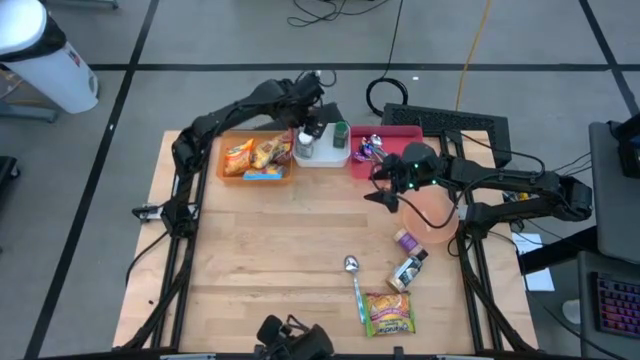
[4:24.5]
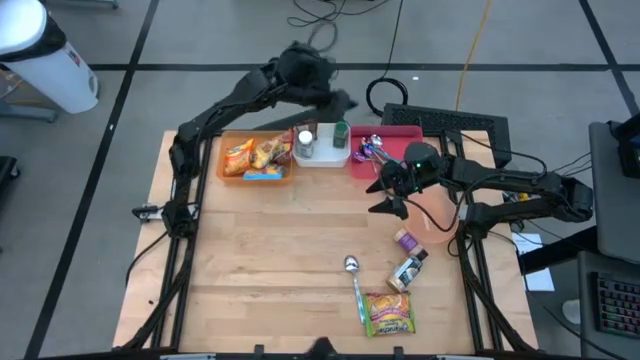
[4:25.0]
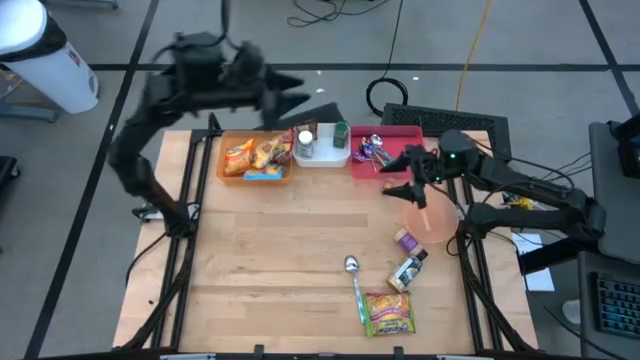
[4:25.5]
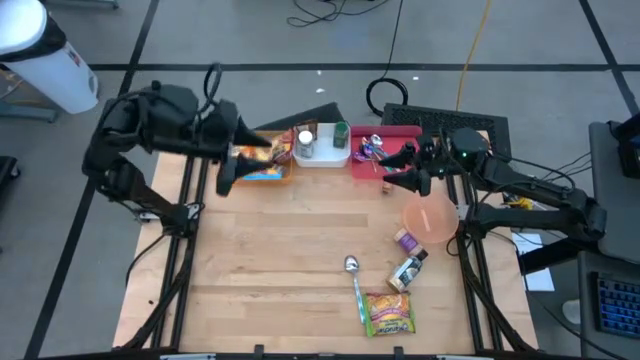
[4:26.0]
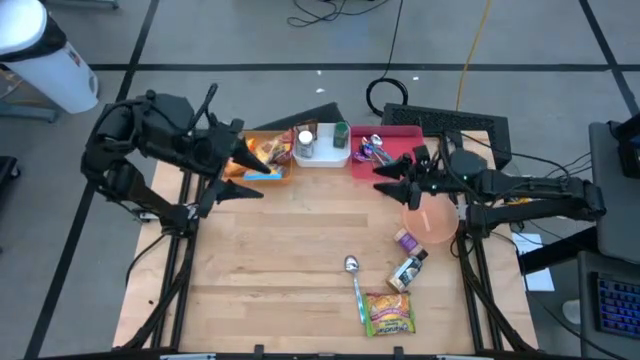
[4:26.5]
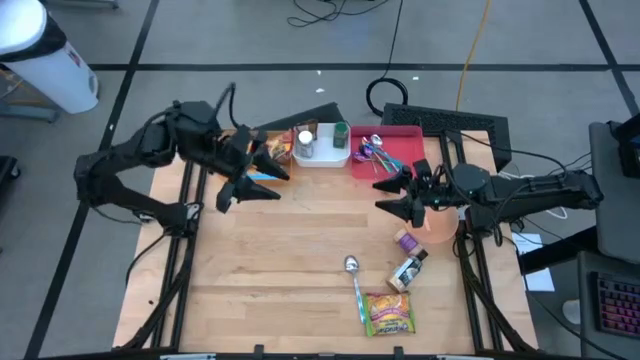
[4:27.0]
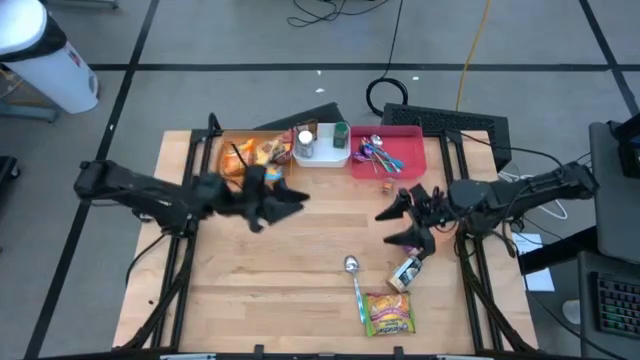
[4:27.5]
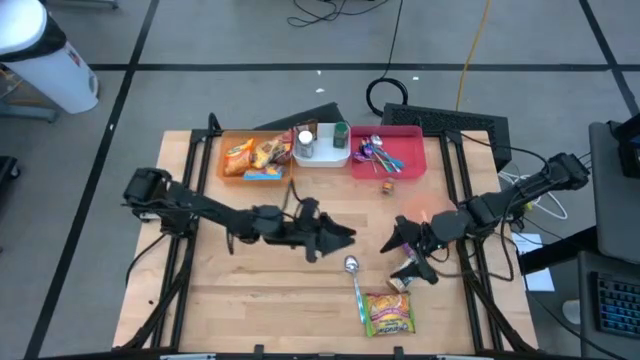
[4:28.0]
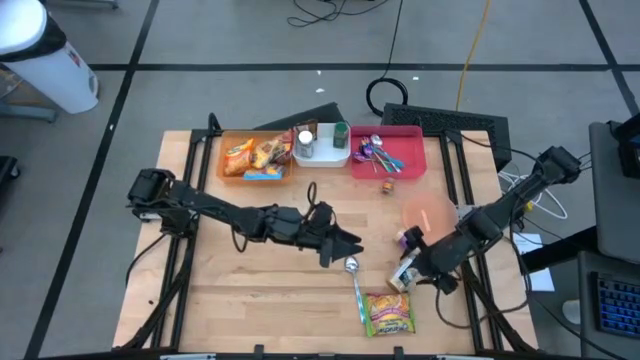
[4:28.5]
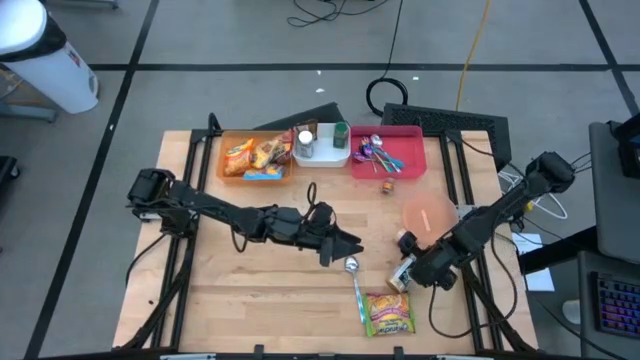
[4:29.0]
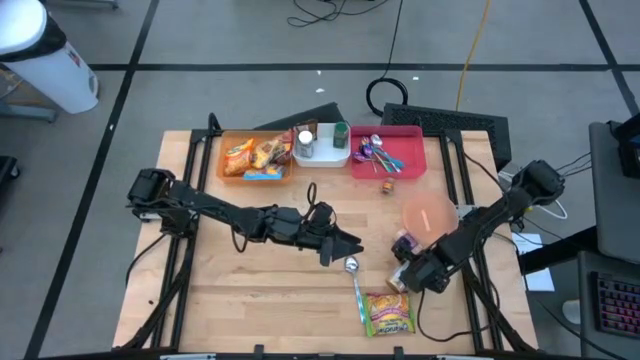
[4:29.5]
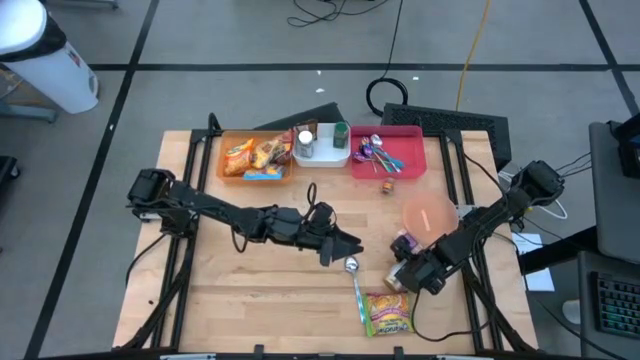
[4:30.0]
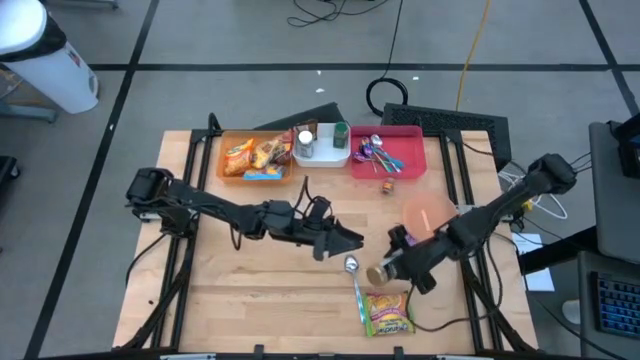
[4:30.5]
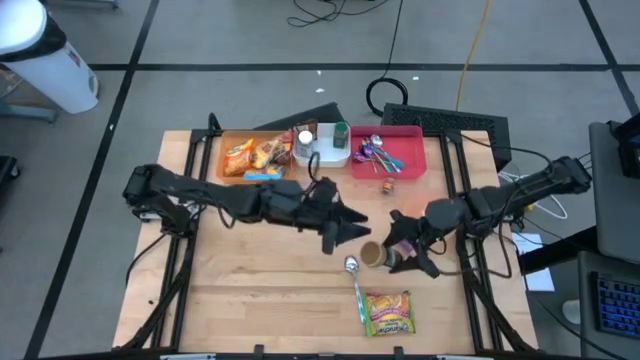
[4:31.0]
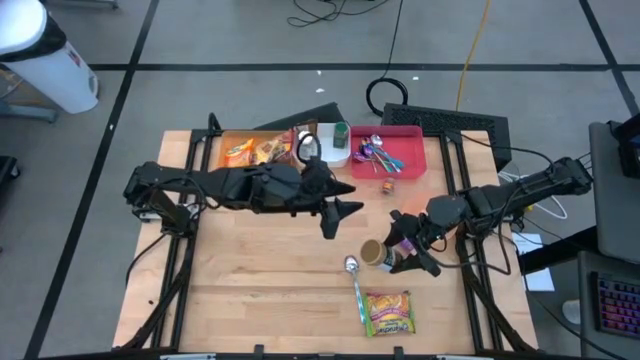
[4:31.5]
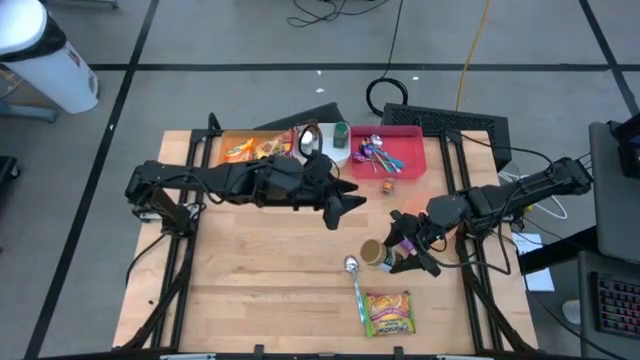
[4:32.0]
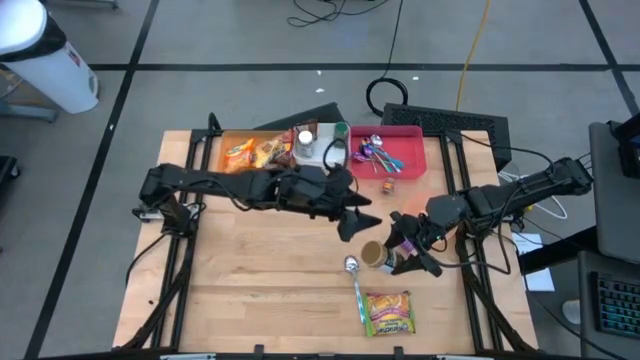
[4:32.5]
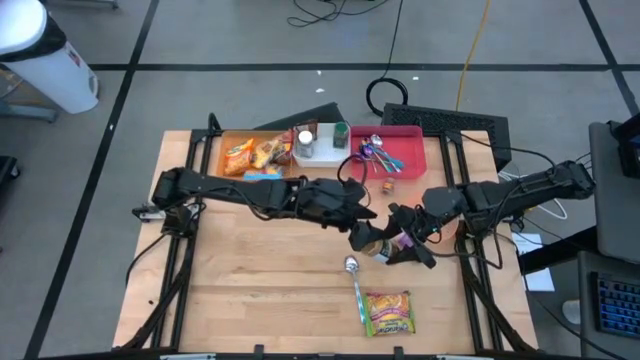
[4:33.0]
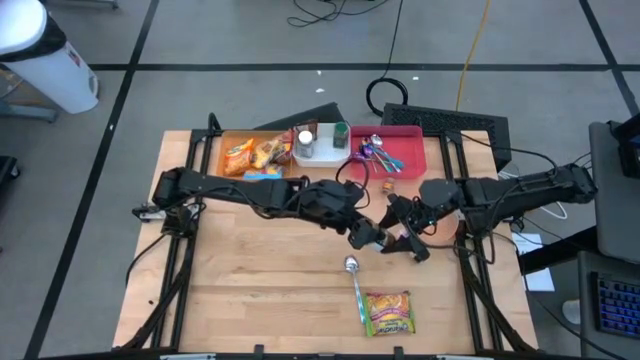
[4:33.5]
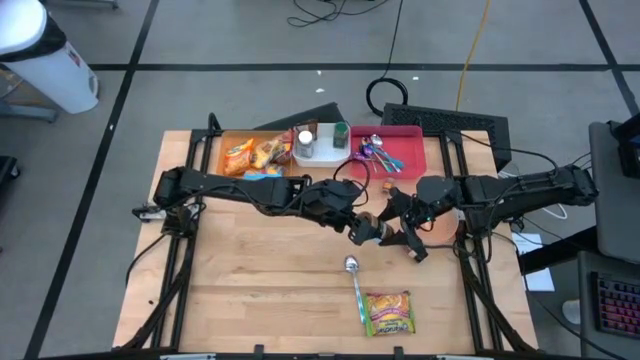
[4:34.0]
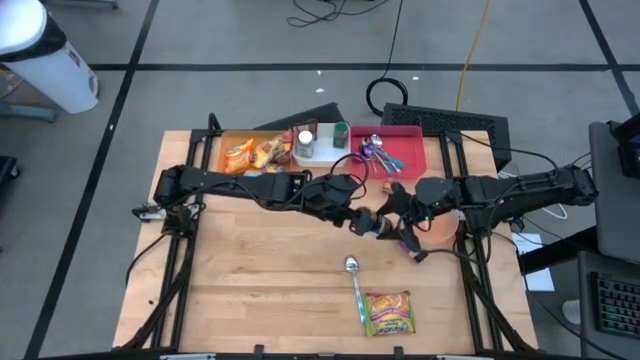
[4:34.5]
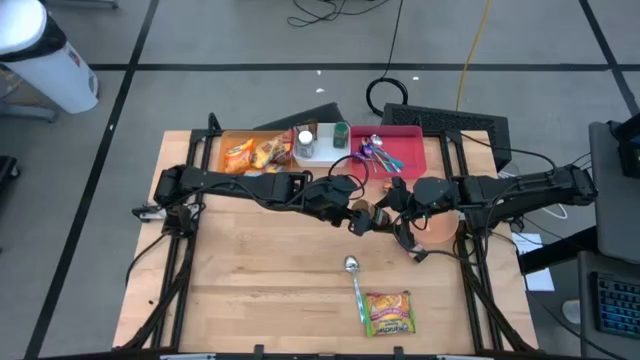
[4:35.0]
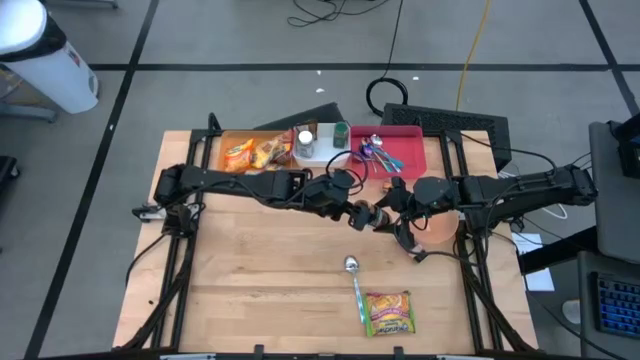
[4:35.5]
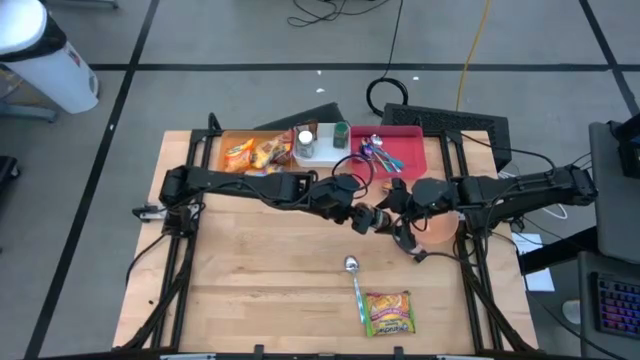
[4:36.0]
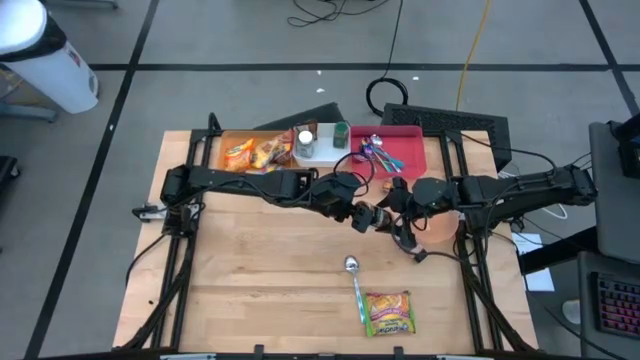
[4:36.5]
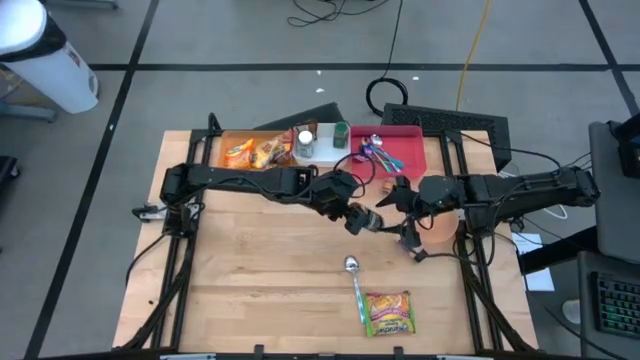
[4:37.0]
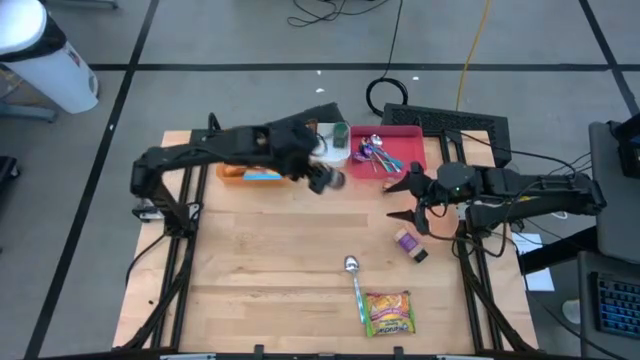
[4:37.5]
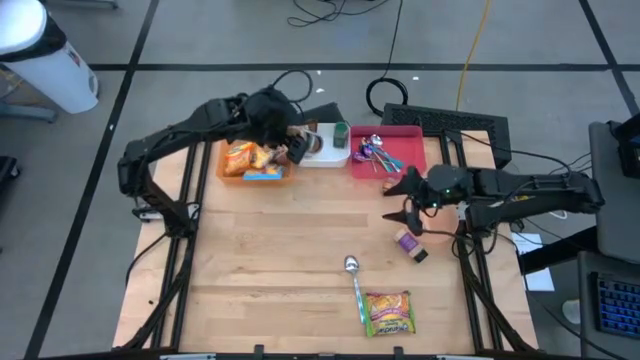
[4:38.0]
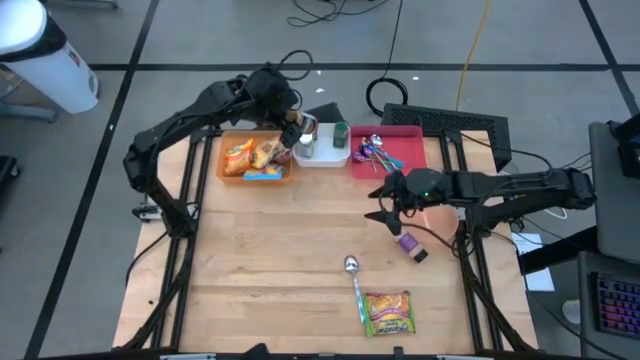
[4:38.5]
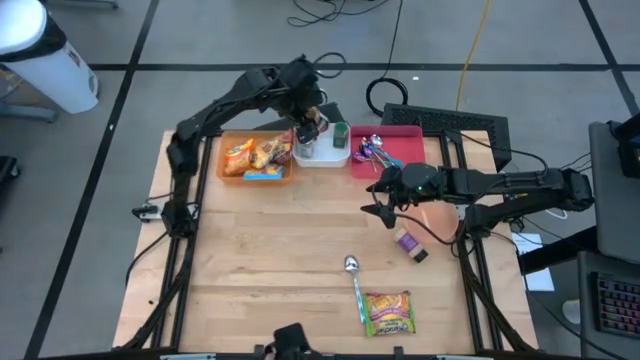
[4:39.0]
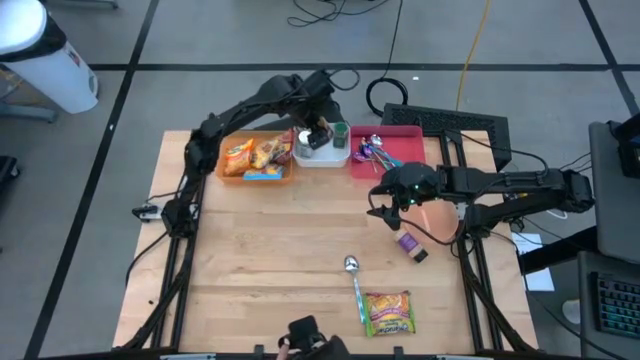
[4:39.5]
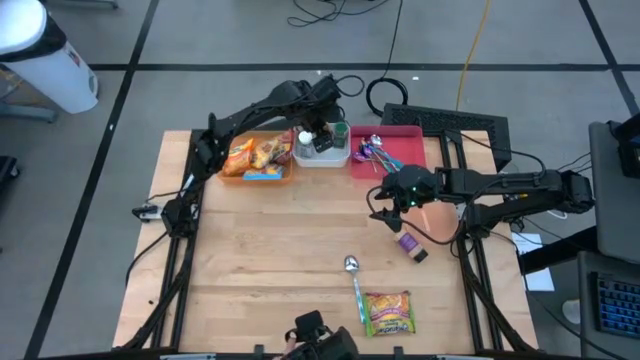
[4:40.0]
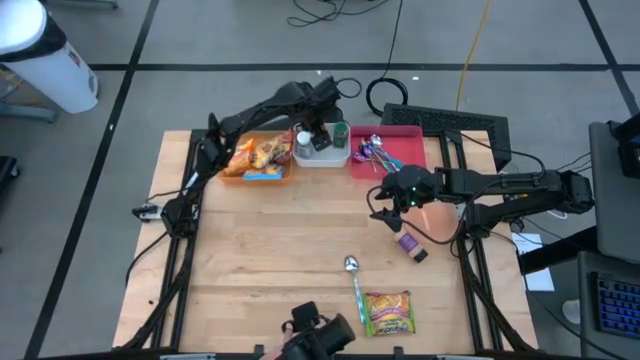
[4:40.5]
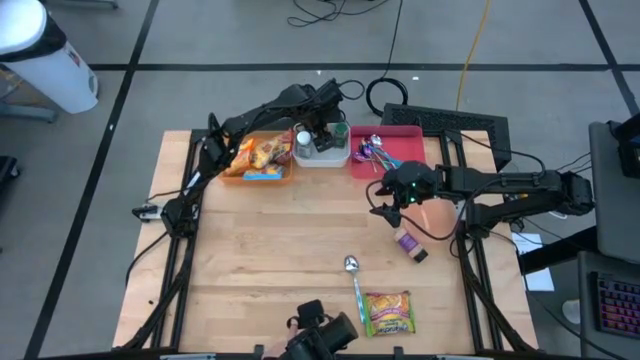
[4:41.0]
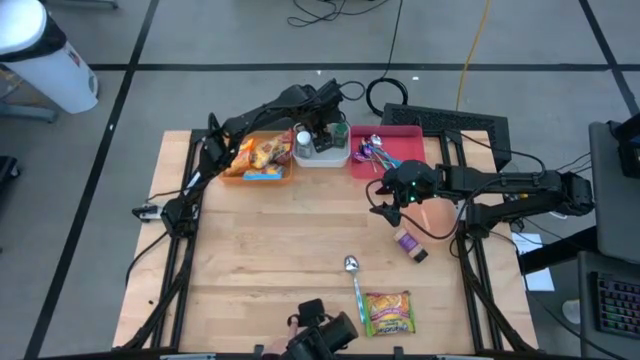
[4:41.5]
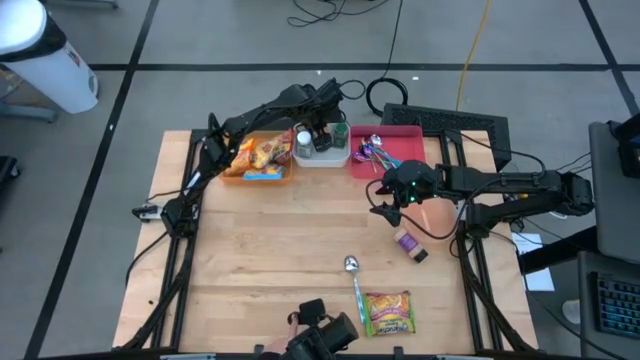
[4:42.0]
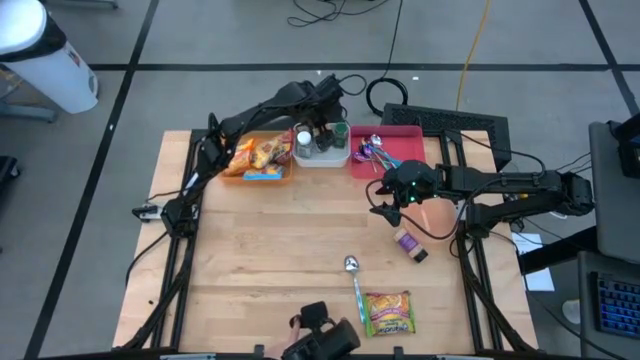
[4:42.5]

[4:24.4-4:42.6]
Task: Pick & Place Food Item
Put the gold seasoning bottle into the white bin
